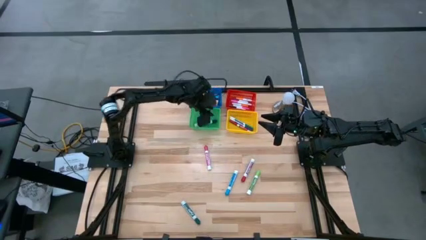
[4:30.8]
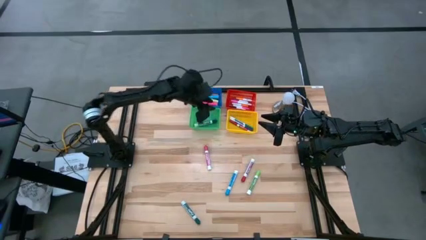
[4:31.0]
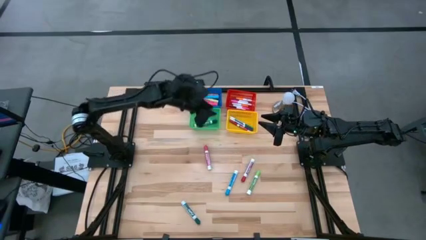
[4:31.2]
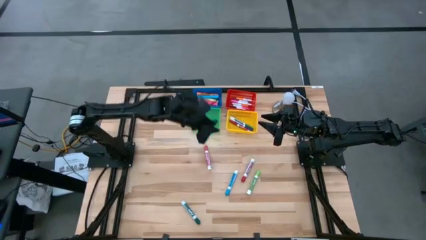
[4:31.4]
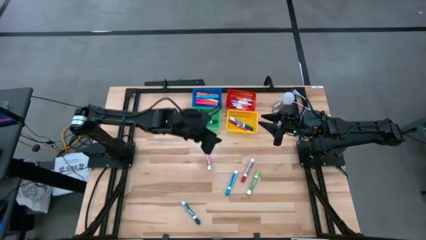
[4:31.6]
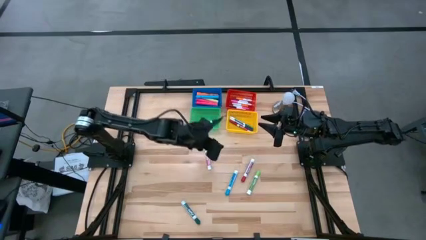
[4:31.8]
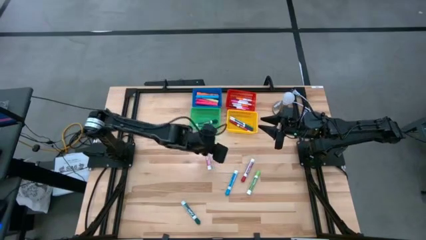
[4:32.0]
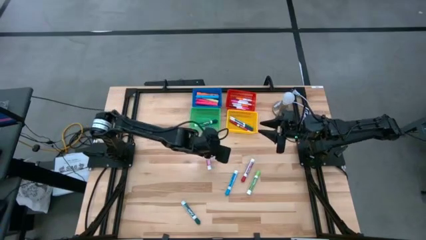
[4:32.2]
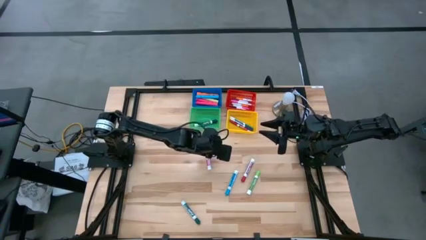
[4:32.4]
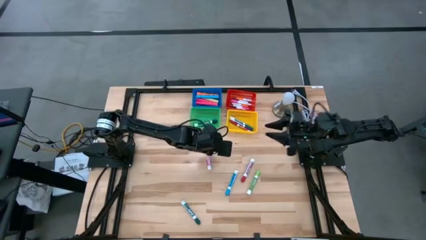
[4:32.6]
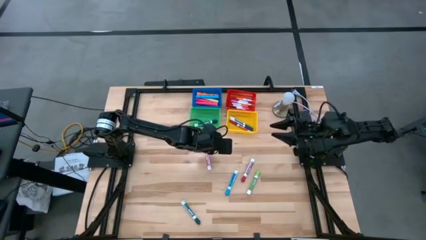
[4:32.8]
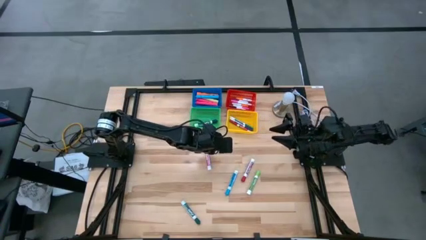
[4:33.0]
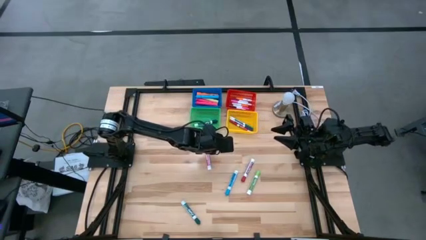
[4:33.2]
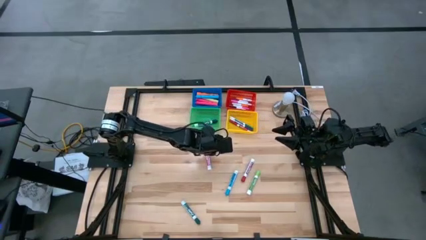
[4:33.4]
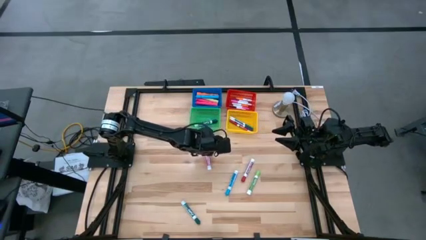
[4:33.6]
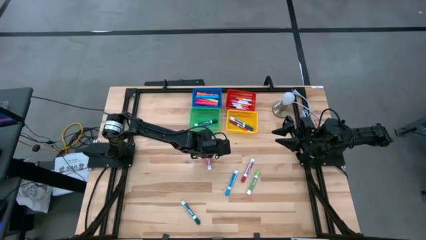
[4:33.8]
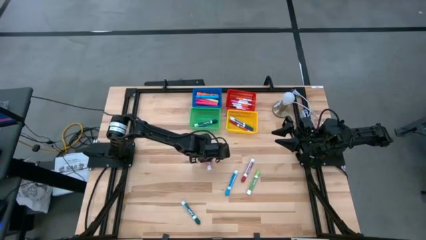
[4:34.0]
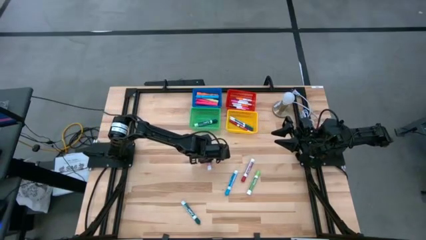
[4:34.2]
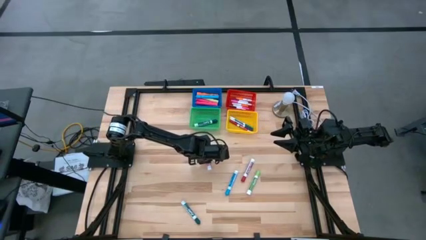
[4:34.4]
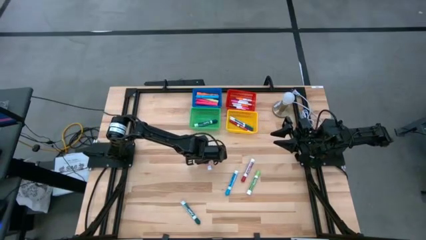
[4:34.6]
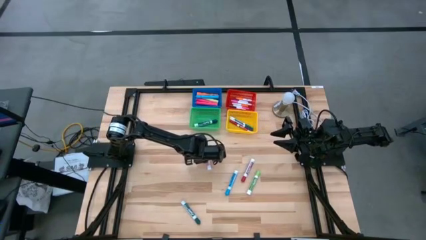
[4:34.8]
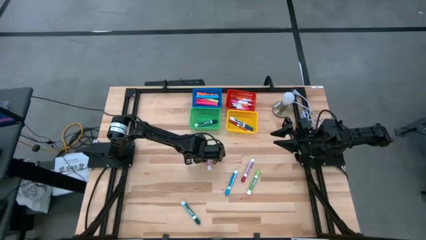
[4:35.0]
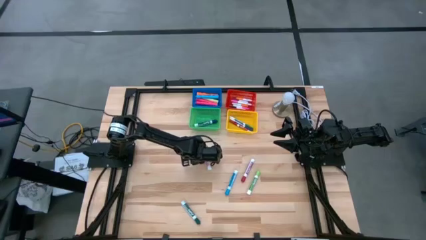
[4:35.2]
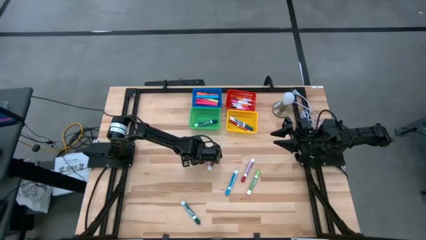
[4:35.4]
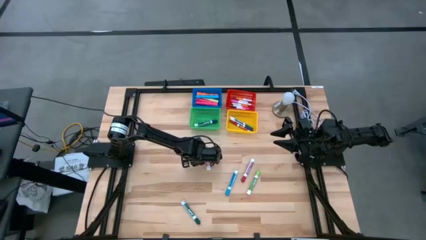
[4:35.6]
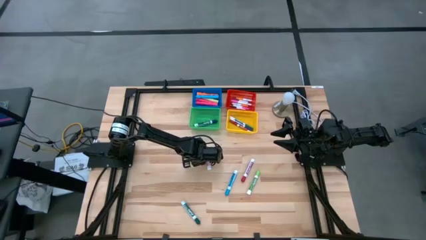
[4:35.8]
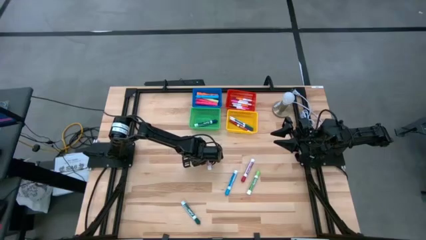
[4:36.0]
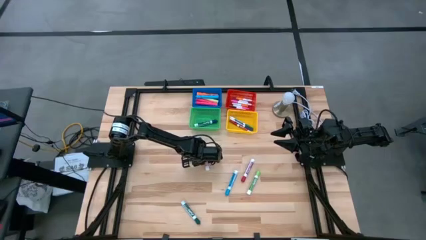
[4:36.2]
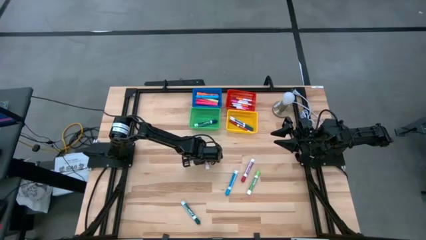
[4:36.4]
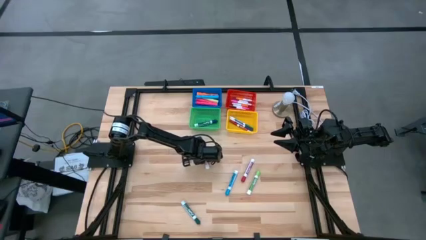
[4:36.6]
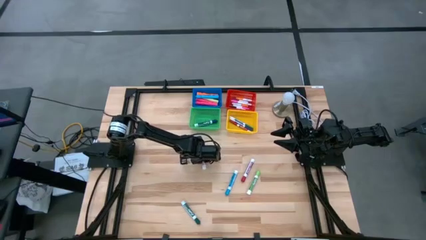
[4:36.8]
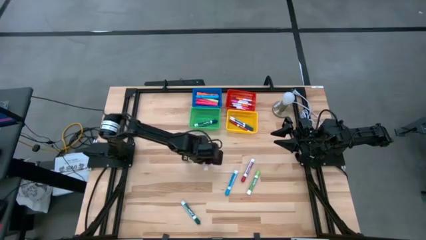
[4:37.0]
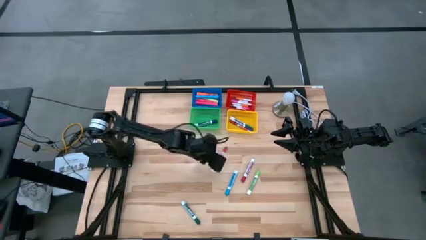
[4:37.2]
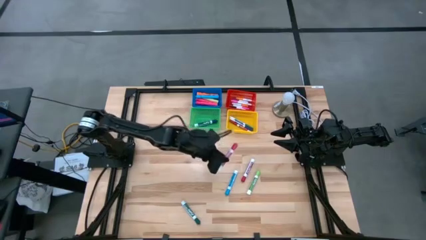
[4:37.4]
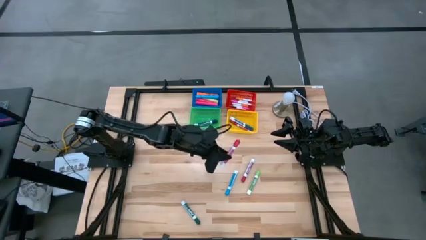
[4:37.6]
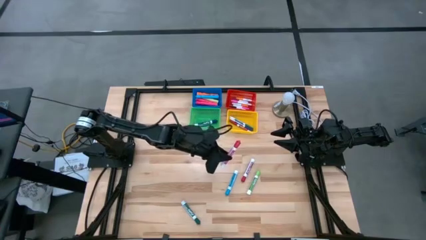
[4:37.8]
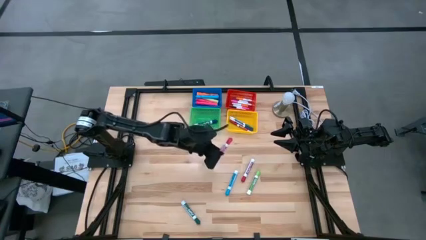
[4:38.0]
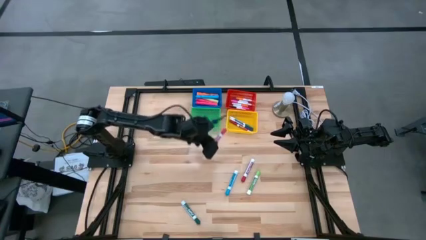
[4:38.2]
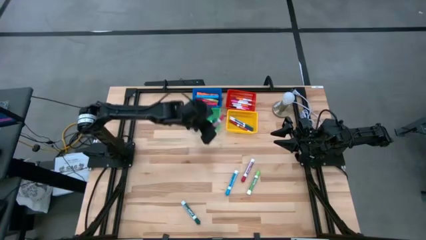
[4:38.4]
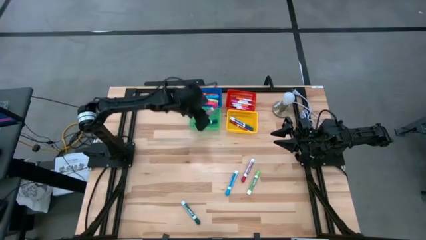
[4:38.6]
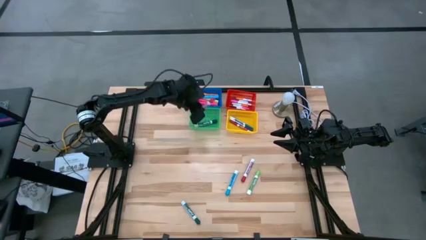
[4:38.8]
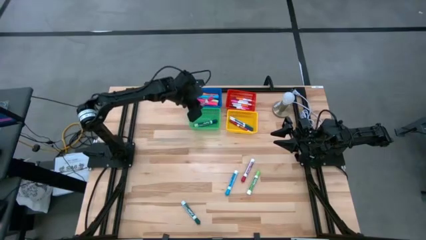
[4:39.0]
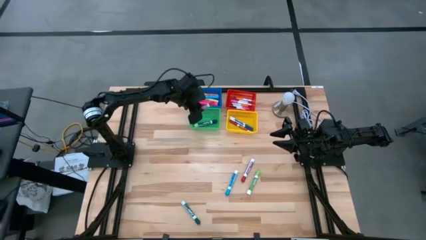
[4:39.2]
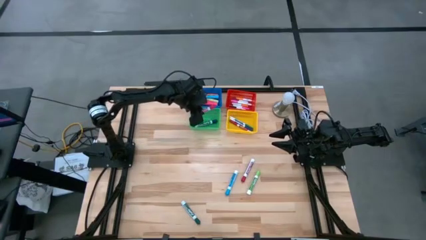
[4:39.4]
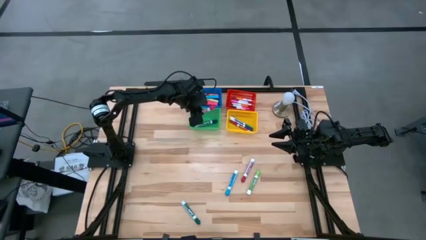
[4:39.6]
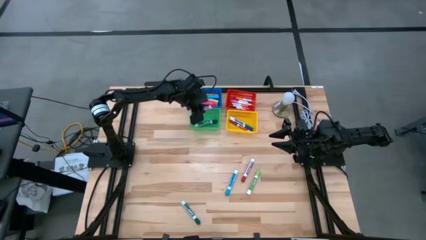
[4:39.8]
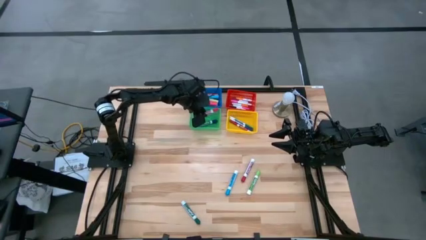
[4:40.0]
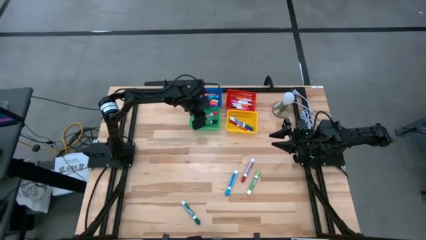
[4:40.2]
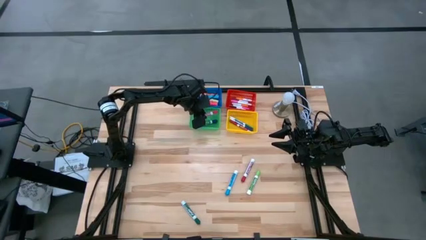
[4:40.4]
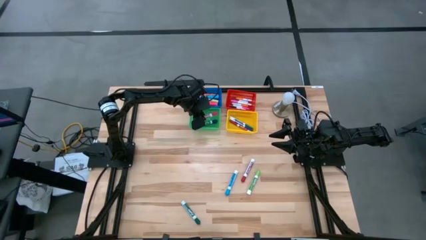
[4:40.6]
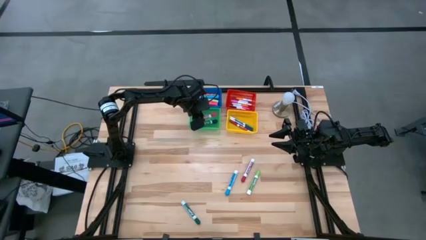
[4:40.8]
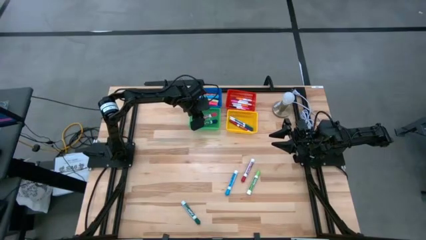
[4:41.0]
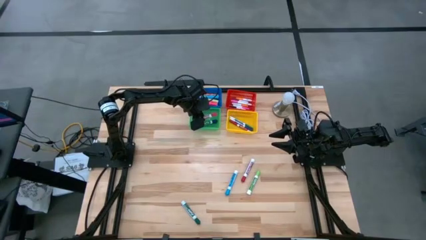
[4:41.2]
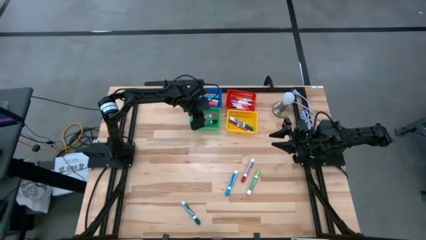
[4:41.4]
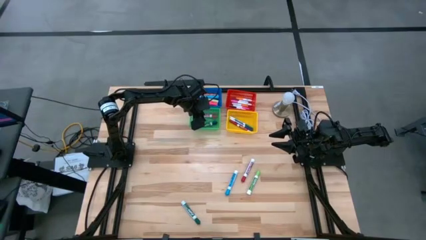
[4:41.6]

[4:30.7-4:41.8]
Task: Pick & Place Markers
Put the large pink marker into the green basket
